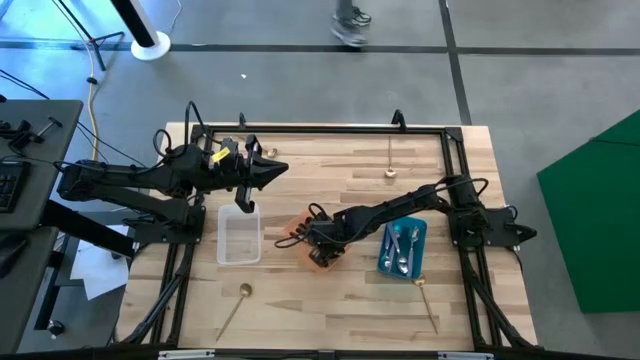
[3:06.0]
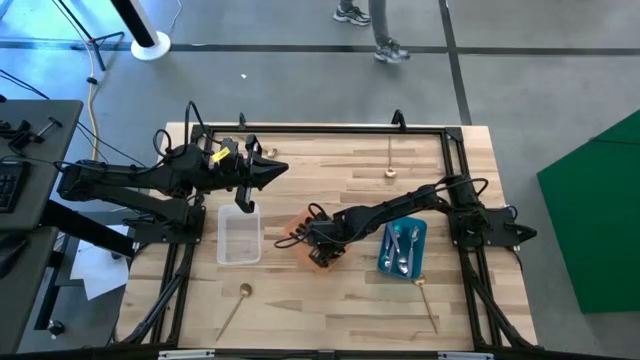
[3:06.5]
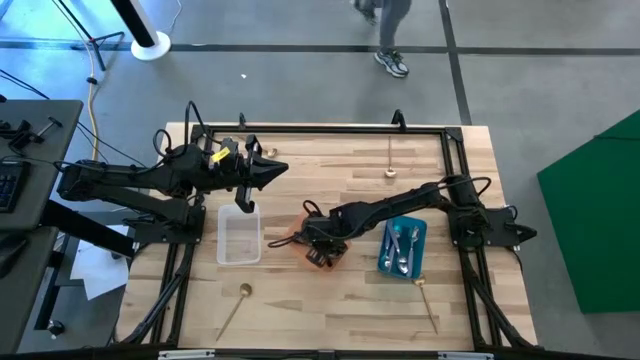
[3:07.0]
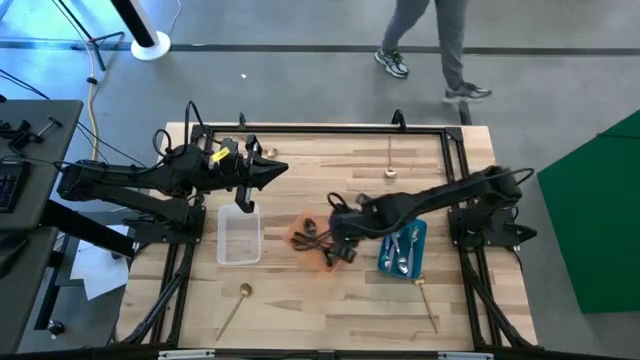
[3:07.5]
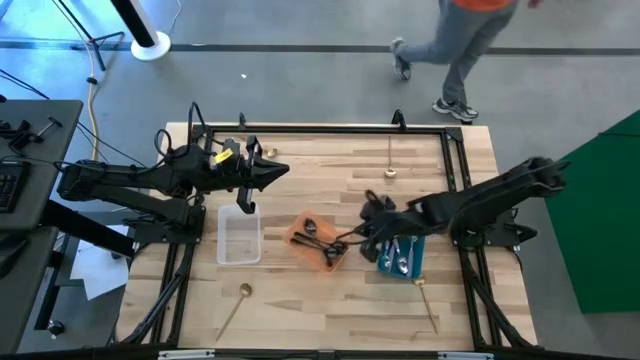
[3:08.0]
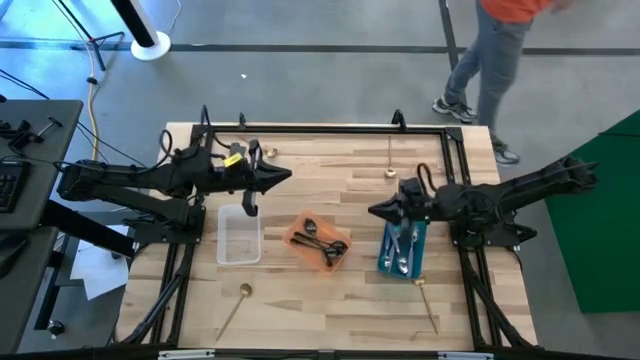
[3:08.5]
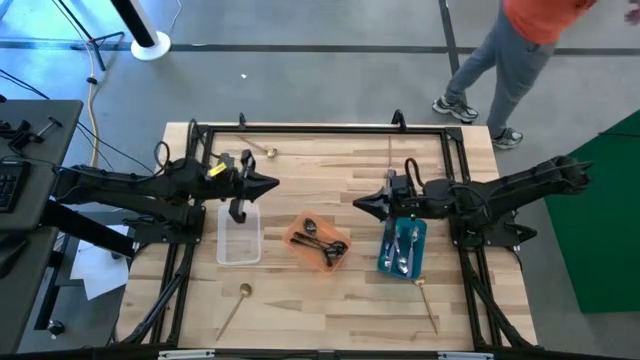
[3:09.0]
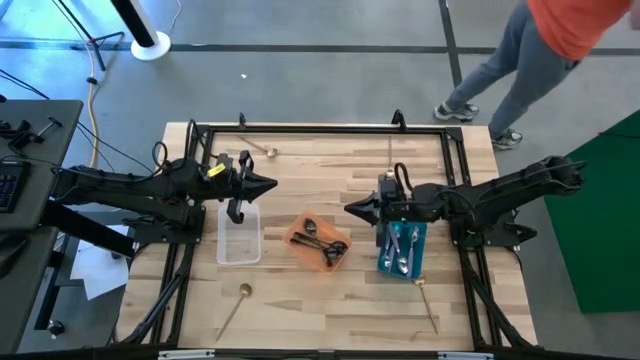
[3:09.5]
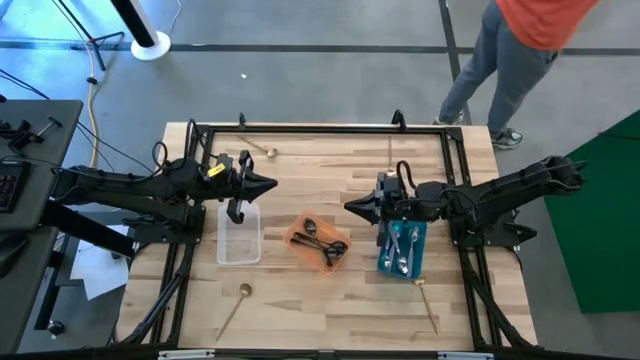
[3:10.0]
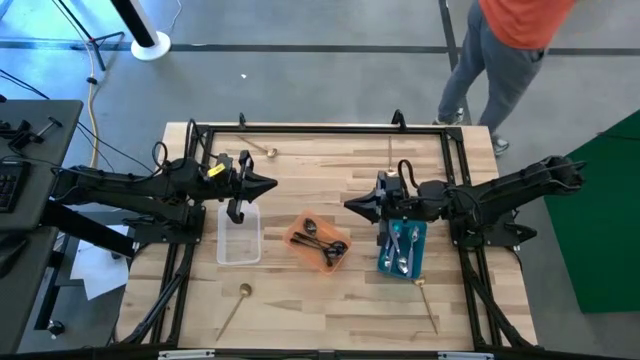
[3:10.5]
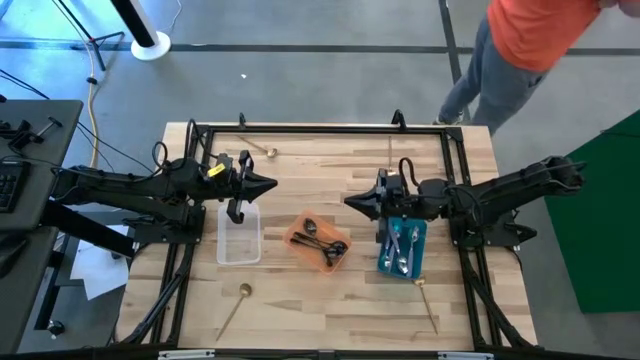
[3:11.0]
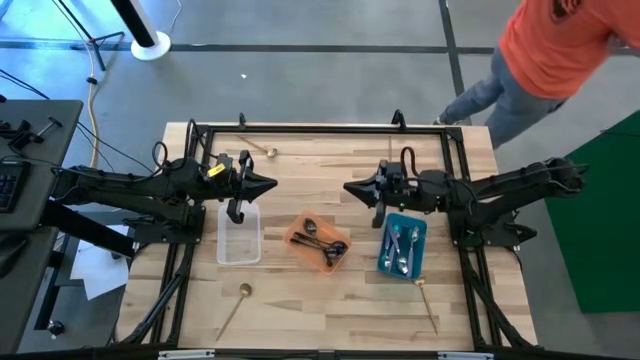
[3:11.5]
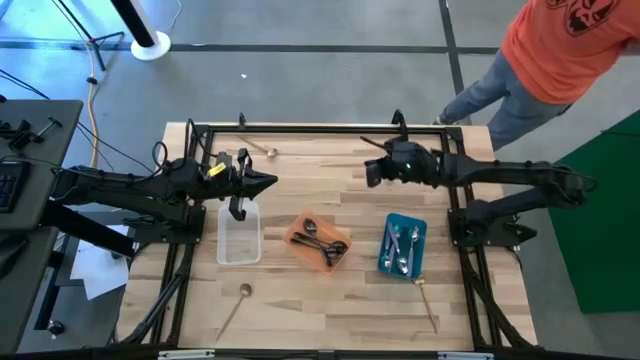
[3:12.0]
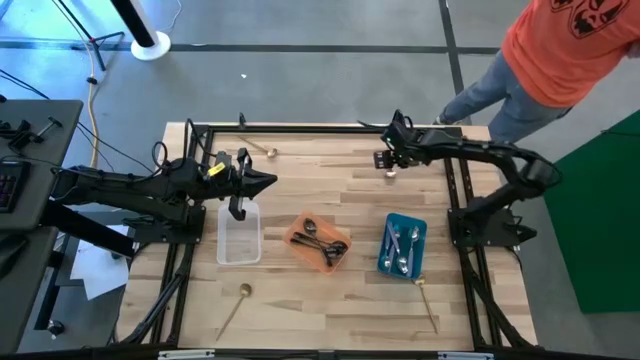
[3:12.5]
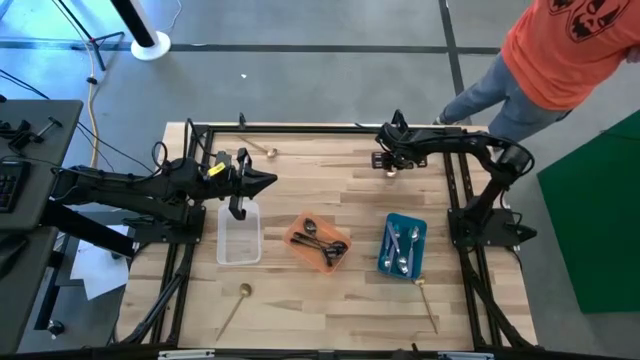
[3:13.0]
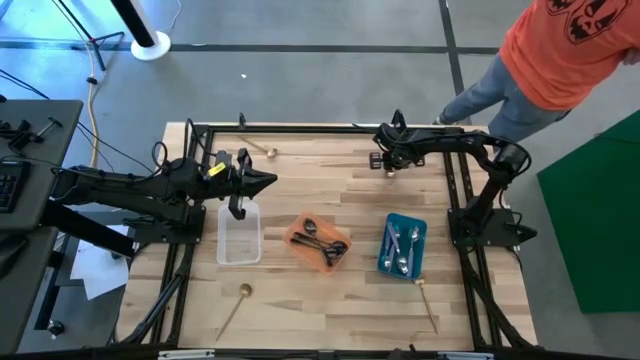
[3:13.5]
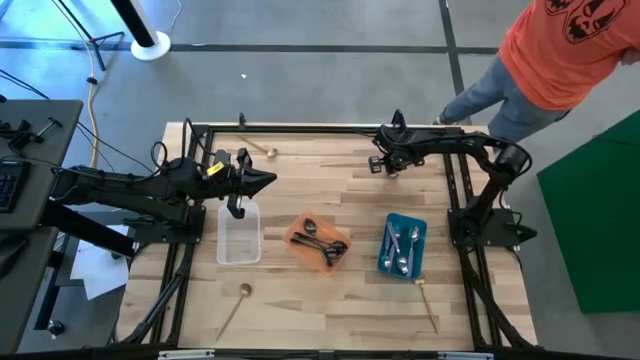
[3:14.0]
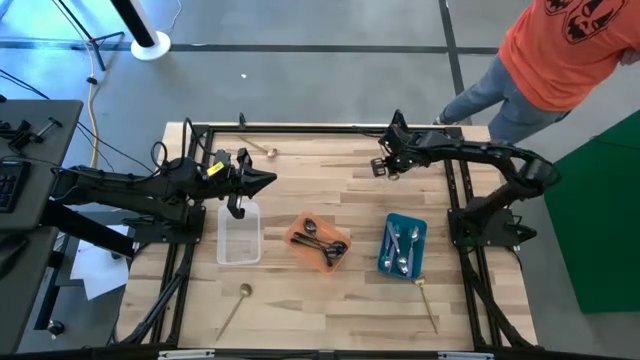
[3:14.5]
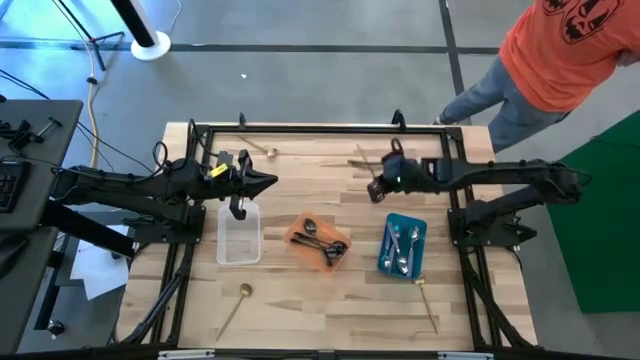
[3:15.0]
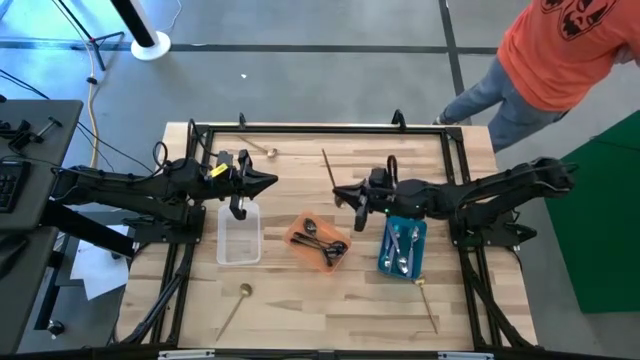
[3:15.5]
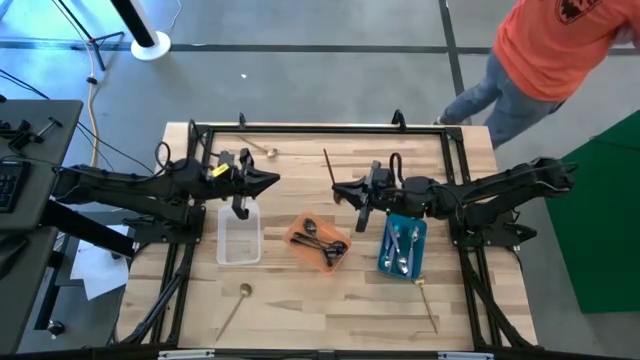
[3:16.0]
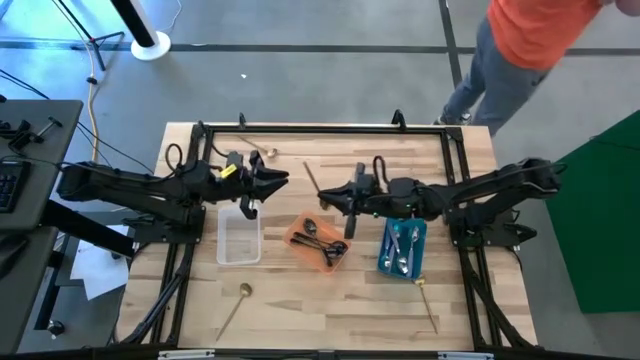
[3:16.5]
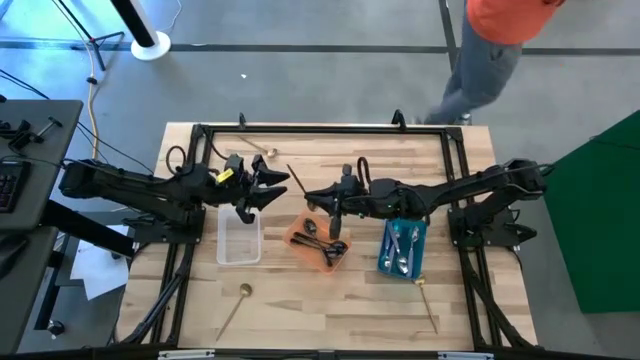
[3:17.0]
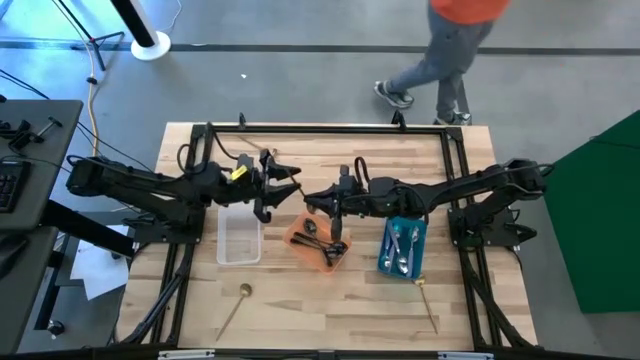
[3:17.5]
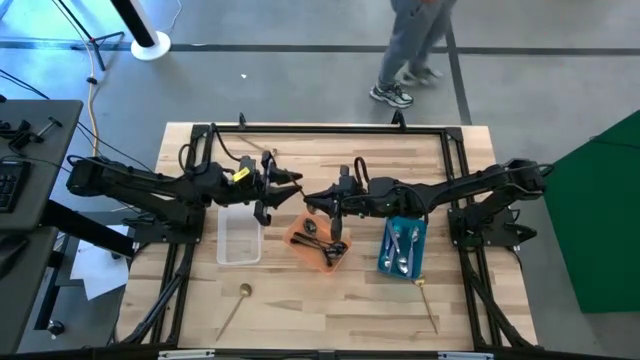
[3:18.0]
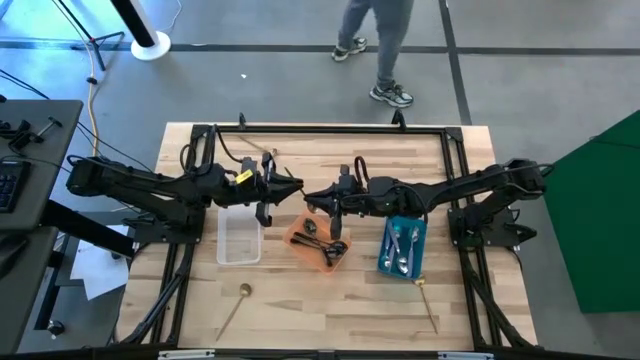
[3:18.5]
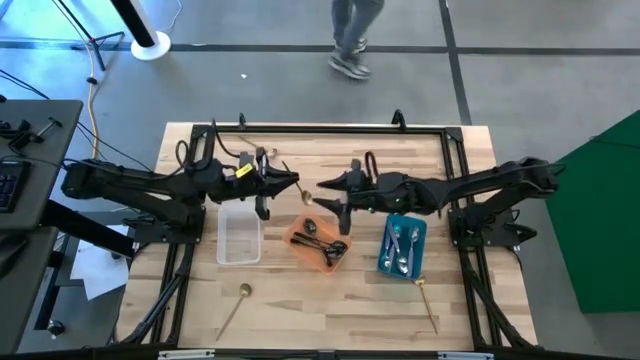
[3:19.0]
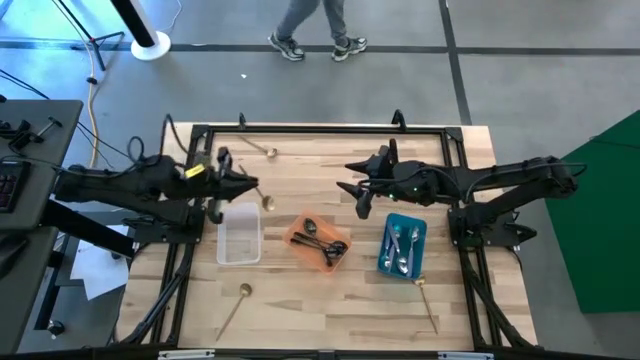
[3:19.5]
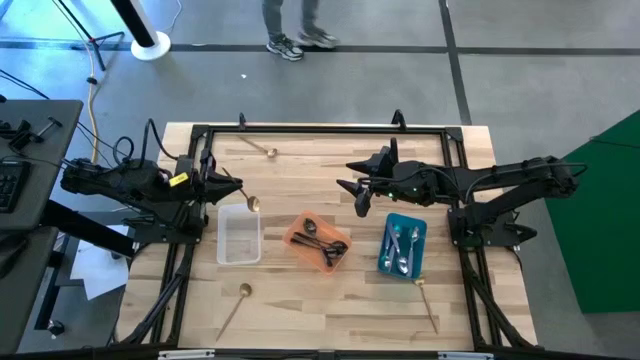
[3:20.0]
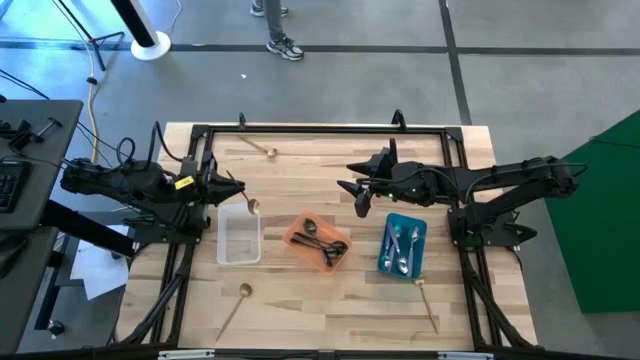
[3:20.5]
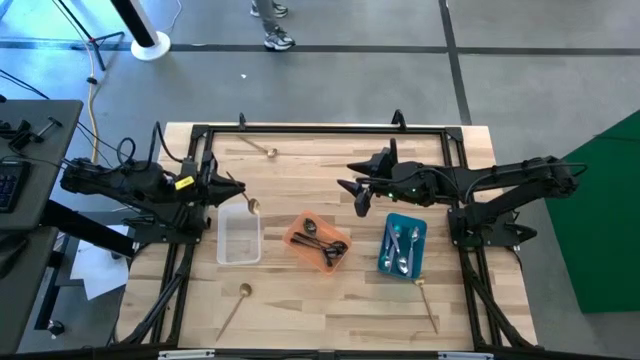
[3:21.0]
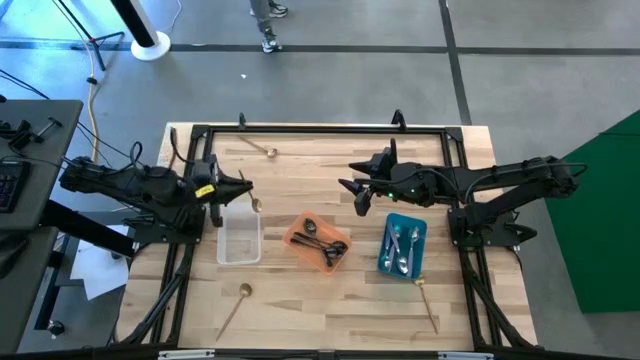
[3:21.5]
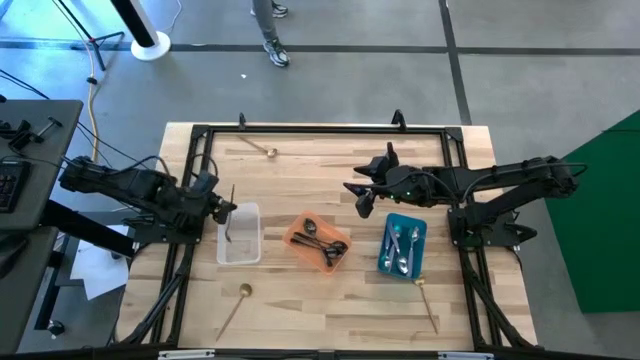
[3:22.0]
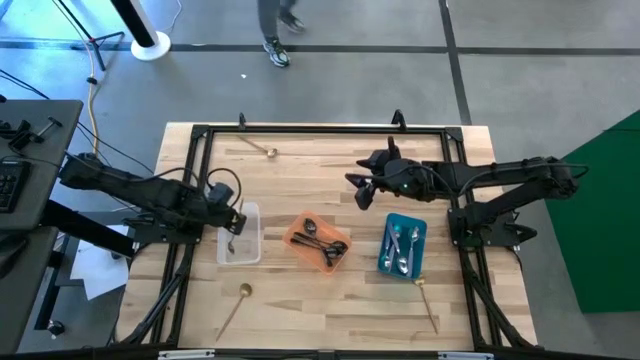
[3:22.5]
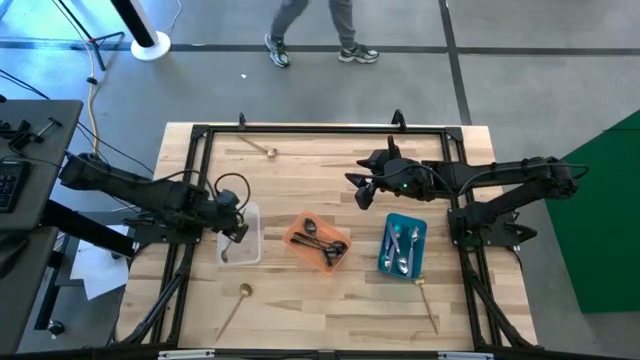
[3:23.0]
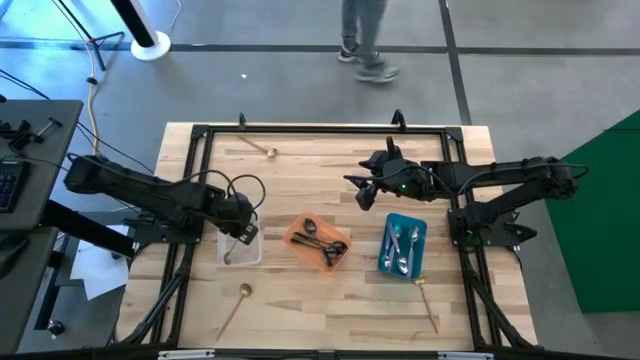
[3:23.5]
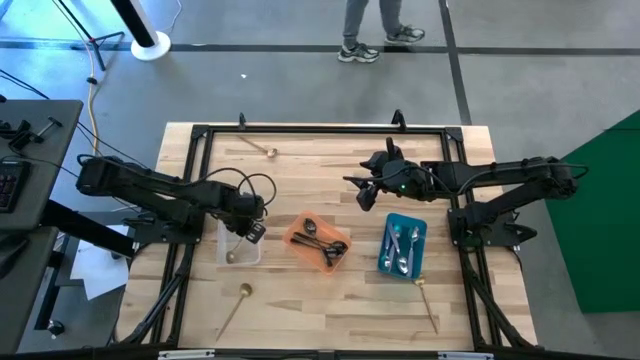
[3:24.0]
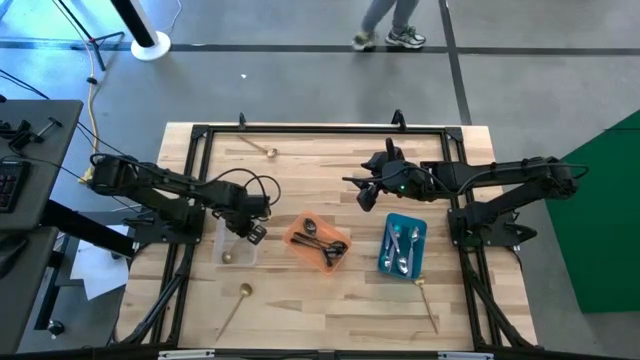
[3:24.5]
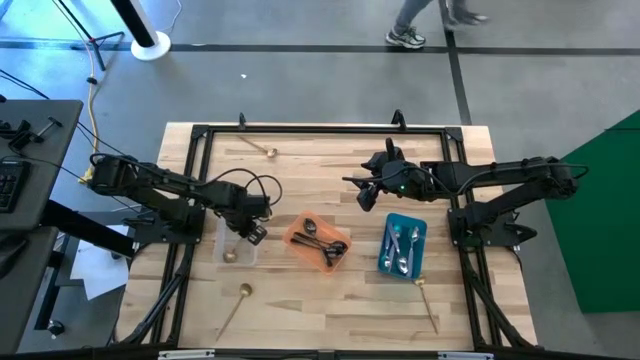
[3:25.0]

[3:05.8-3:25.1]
Task: Sort silverware by color (type)
Put the top right gold spoon into the transparent bin
